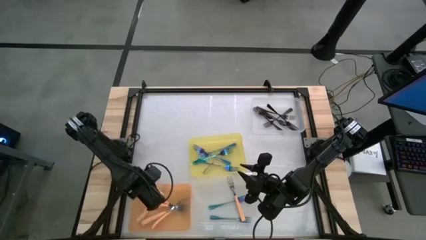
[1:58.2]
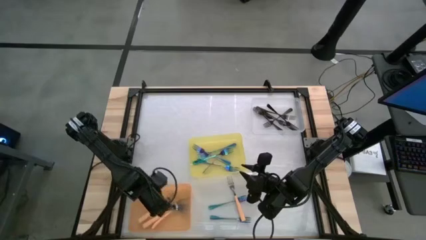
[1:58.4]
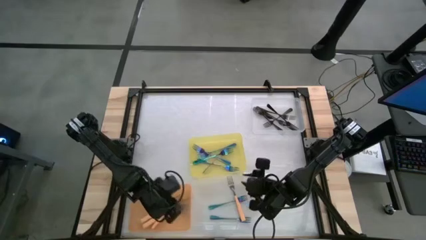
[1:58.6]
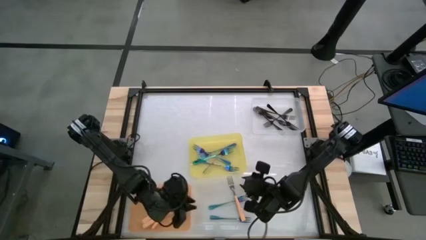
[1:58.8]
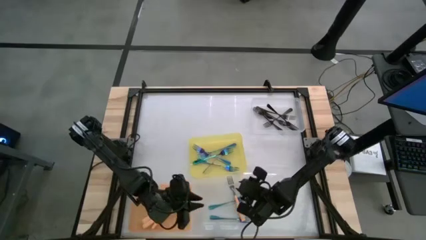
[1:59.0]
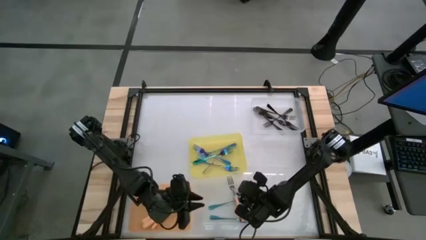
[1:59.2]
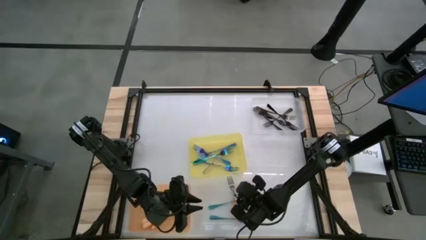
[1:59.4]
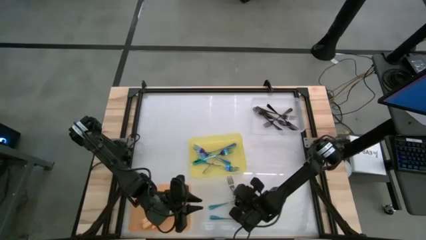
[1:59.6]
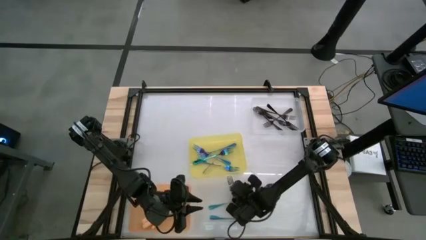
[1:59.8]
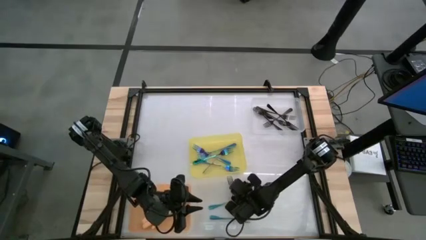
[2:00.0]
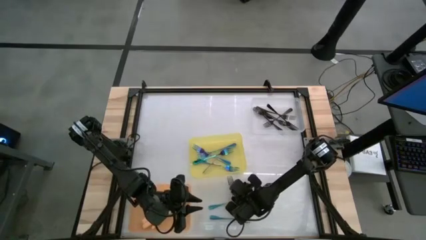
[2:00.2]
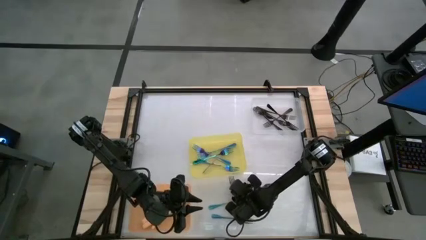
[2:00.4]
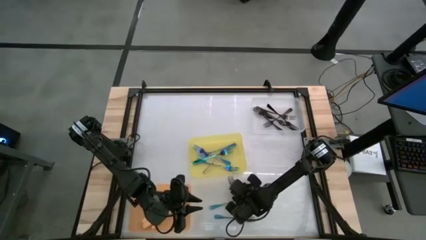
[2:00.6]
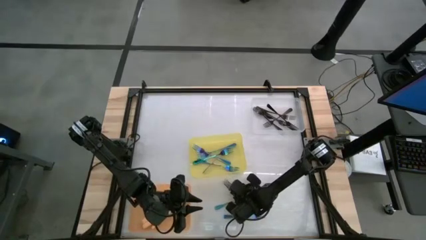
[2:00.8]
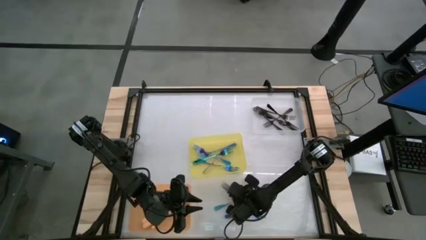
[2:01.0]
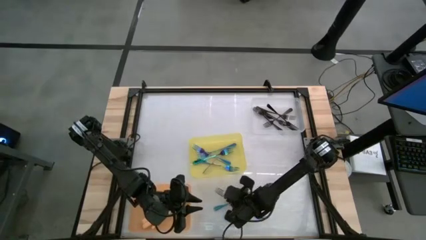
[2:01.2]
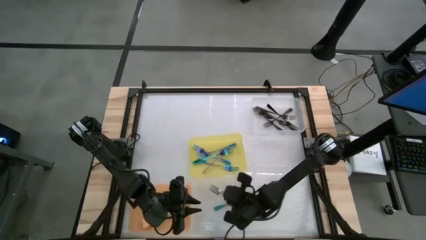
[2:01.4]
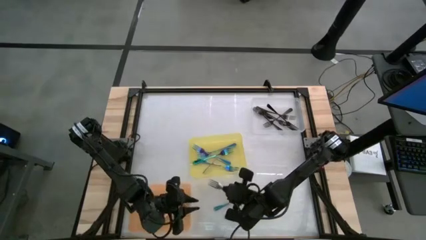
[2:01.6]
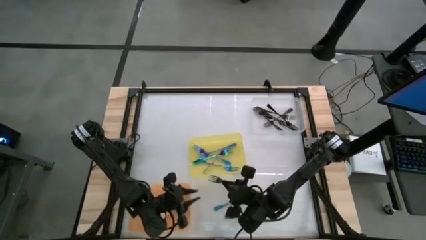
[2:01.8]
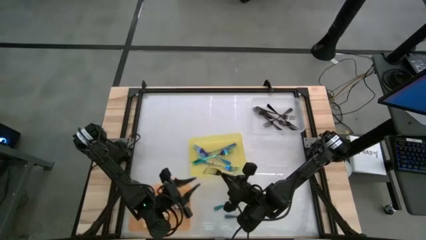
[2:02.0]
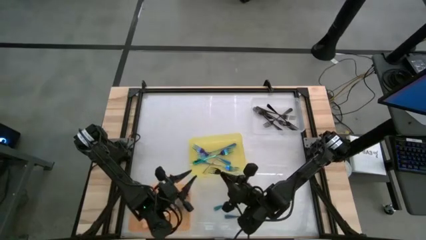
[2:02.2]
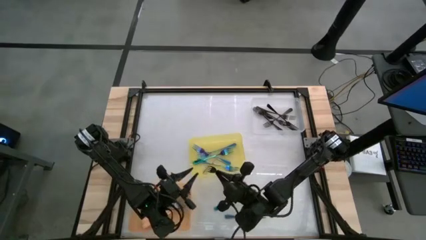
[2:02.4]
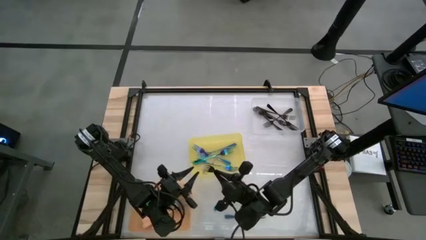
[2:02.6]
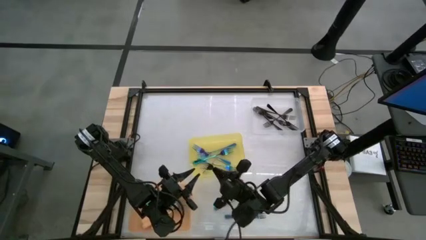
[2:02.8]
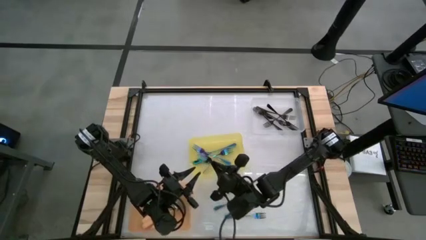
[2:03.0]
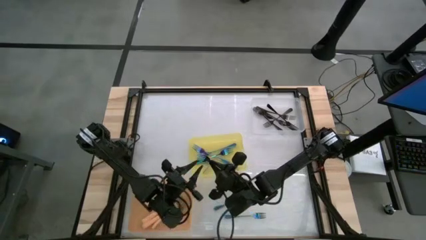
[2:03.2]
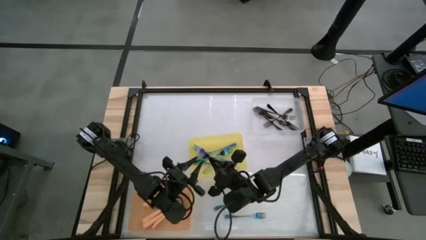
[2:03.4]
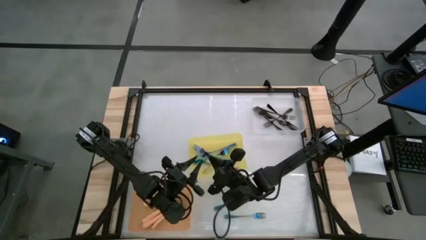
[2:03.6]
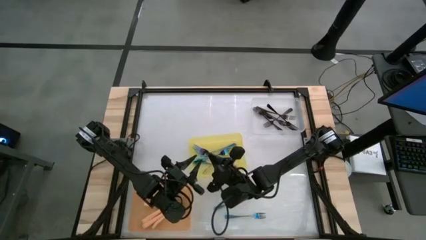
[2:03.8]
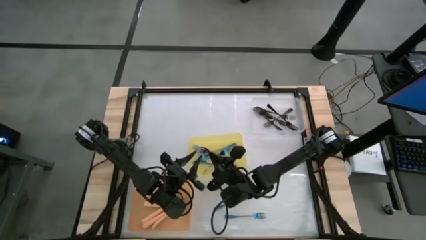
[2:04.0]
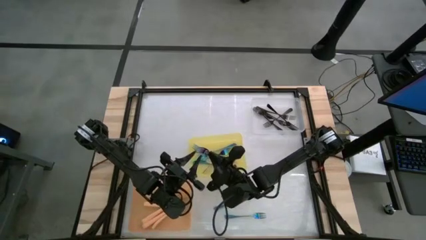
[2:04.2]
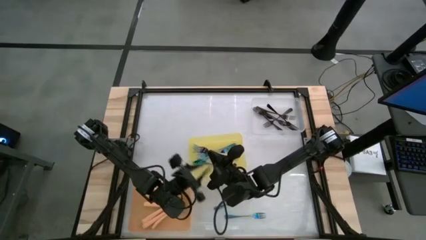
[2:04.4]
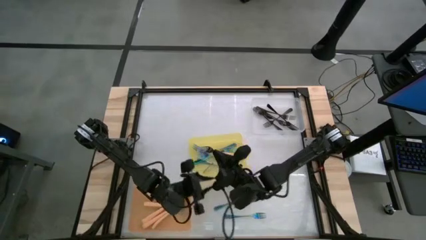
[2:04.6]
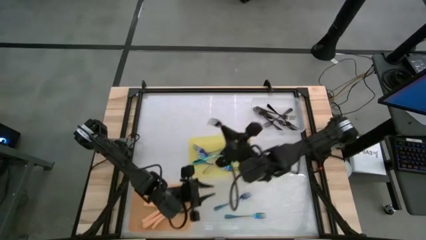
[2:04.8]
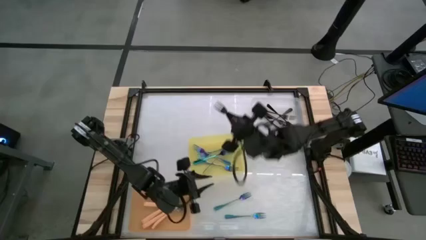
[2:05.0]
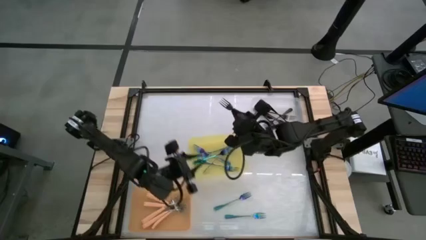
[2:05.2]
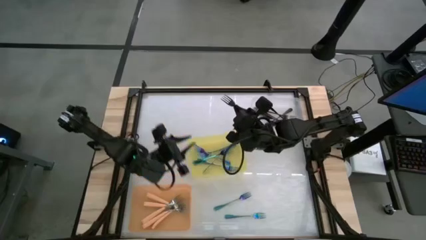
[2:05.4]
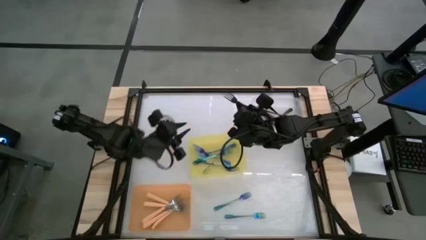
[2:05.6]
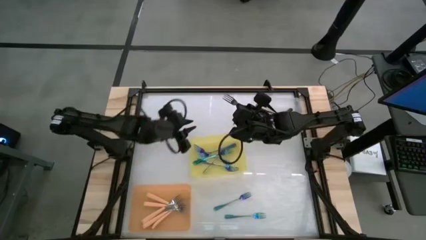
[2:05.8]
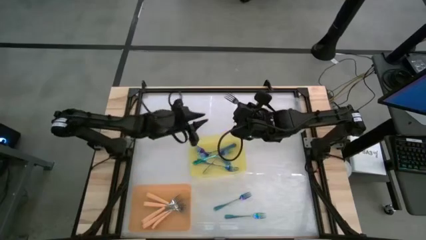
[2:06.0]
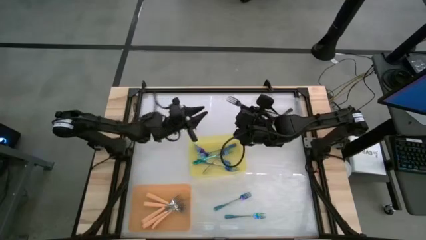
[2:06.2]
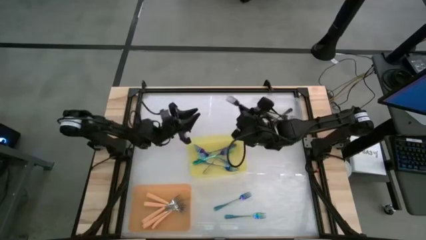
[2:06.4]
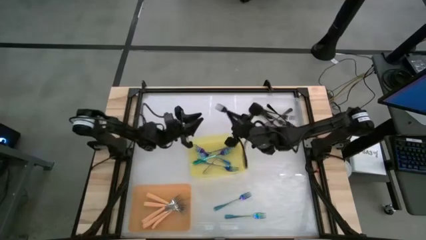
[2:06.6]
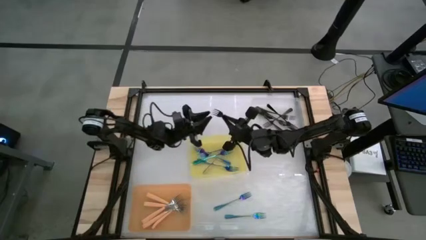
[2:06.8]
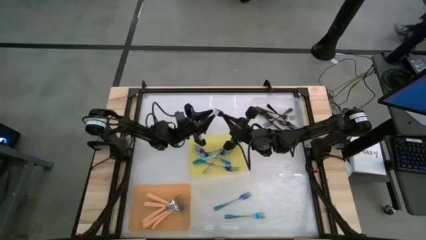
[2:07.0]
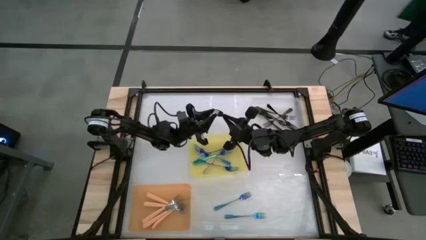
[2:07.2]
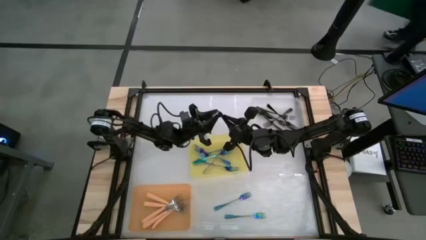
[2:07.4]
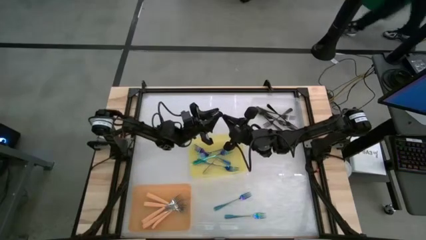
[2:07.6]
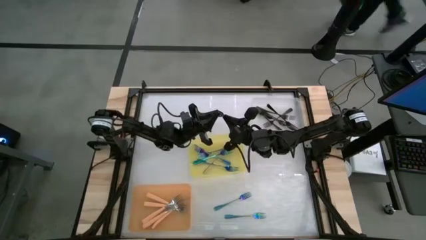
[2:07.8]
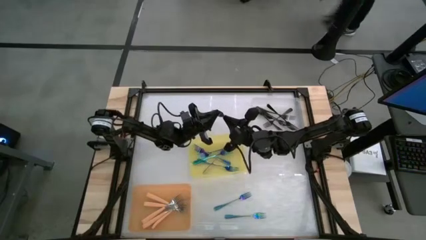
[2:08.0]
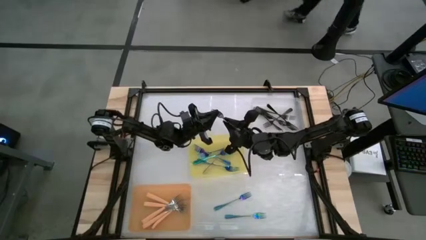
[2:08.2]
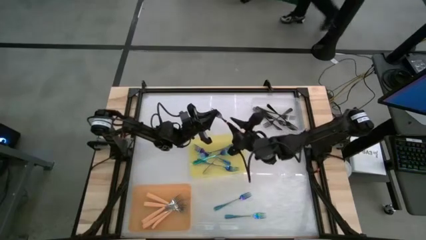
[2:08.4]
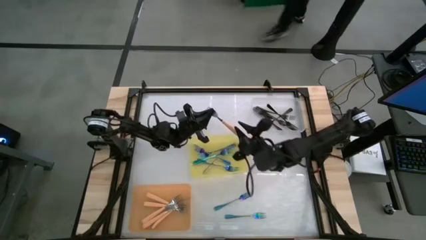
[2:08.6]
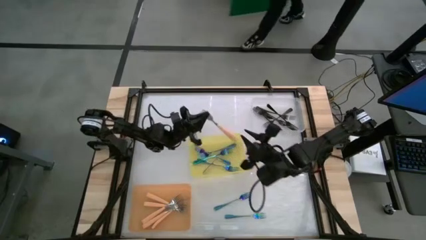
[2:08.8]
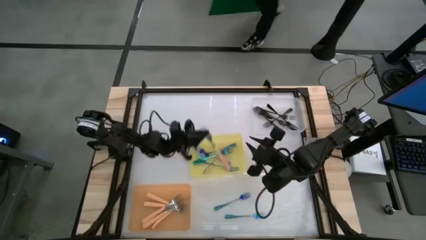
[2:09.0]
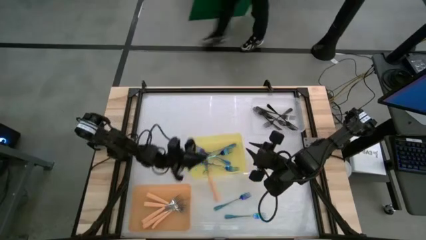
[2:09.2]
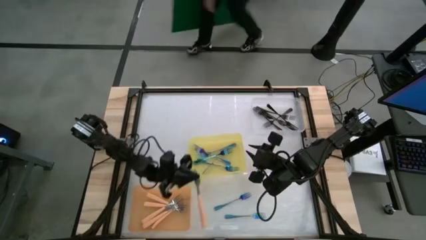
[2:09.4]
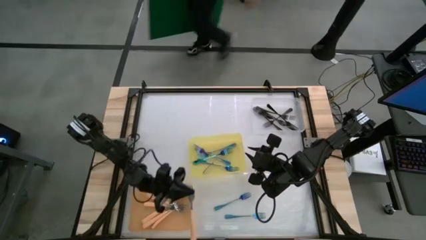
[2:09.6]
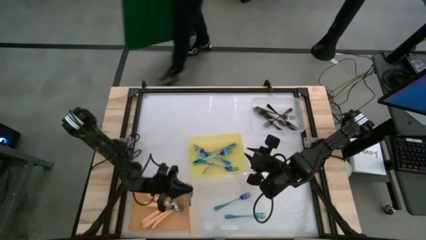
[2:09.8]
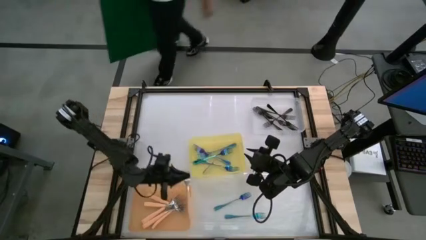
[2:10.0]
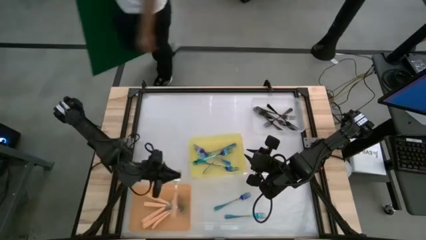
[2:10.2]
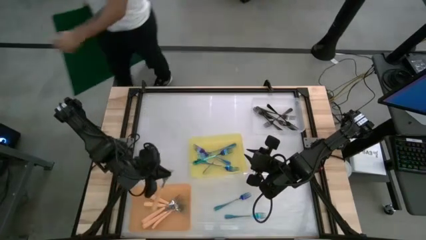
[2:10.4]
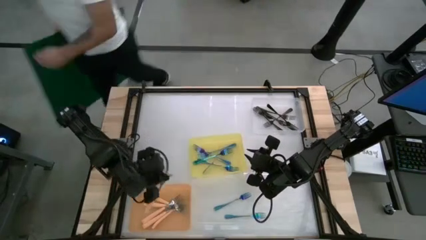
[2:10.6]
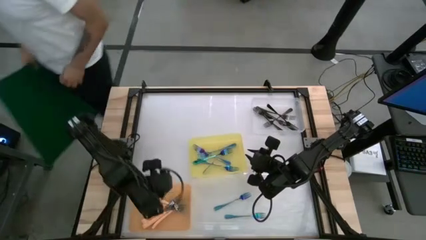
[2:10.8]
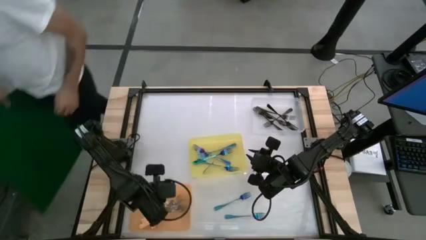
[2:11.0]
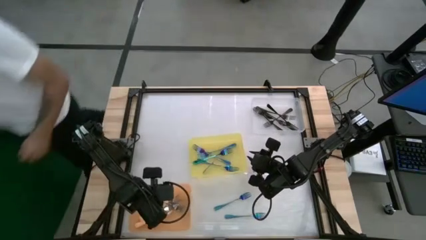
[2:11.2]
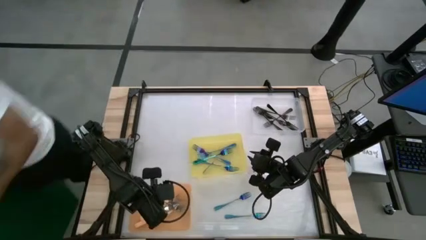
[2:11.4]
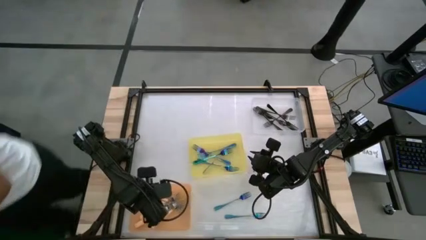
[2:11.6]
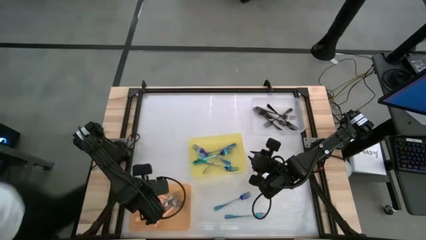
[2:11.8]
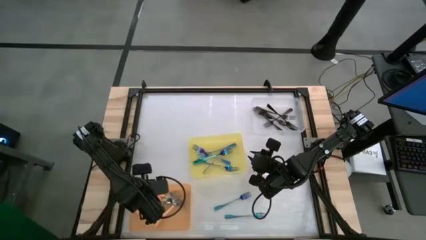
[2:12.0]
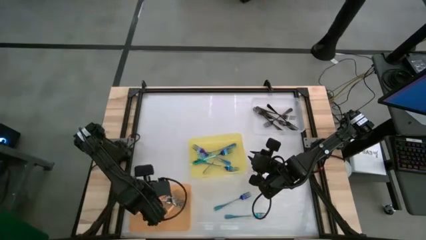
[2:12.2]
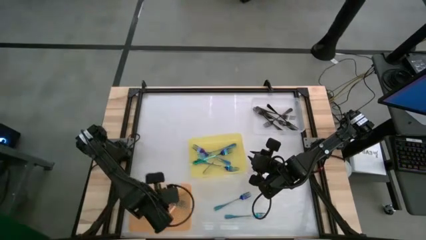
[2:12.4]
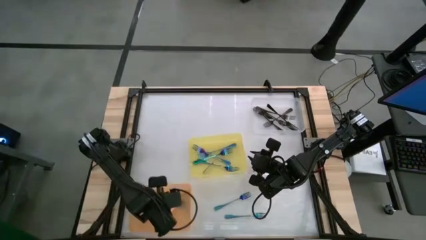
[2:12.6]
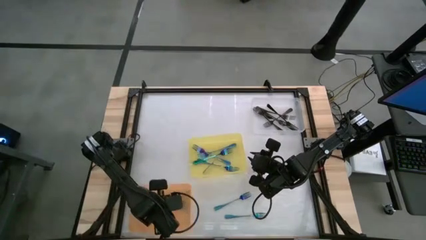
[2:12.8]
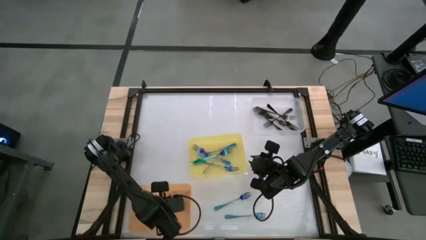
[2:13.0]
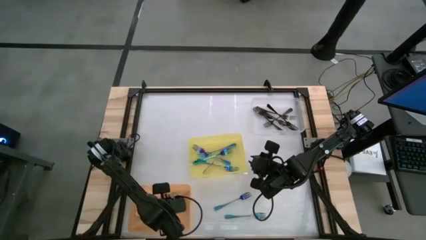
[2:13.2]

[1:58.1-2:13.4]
Task: Sort silverware by color (type)
Put the orange fork into the orange bin

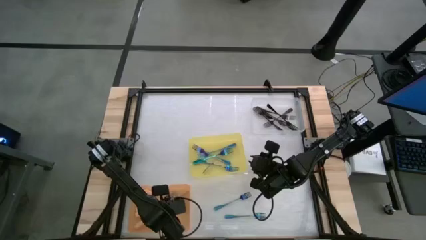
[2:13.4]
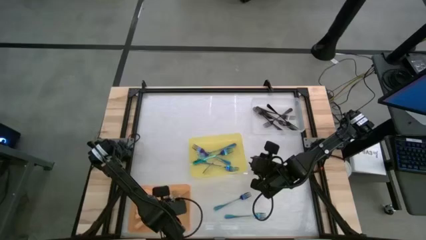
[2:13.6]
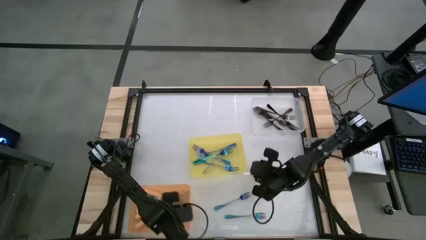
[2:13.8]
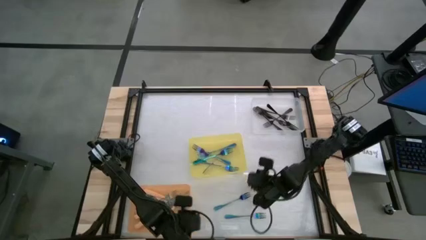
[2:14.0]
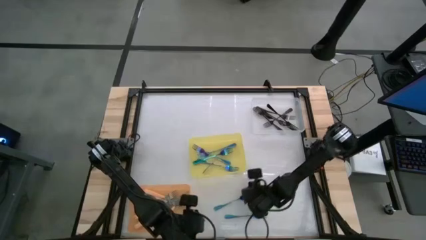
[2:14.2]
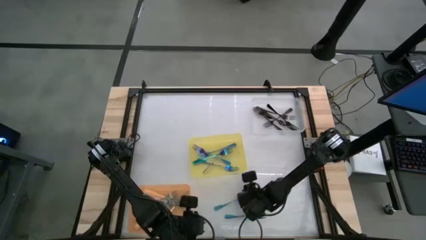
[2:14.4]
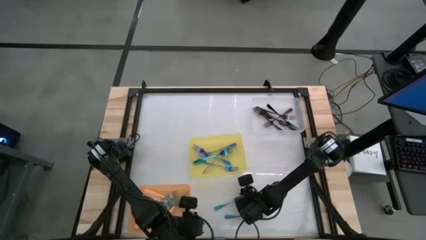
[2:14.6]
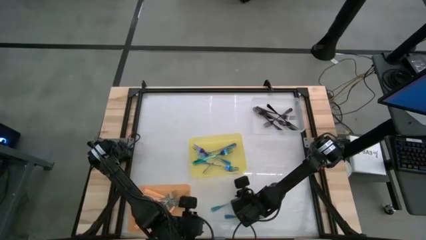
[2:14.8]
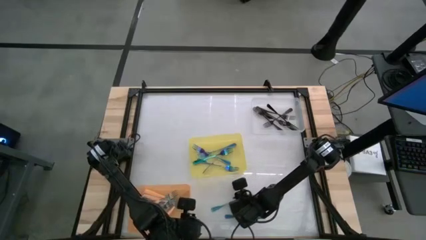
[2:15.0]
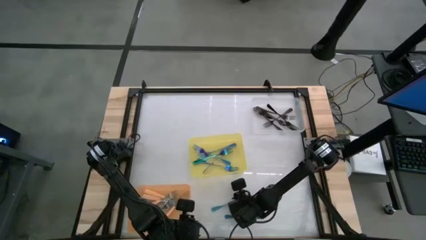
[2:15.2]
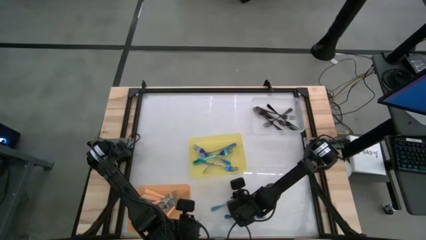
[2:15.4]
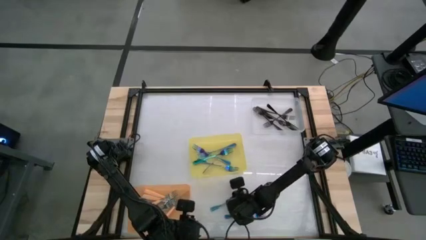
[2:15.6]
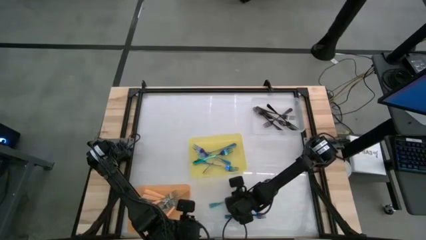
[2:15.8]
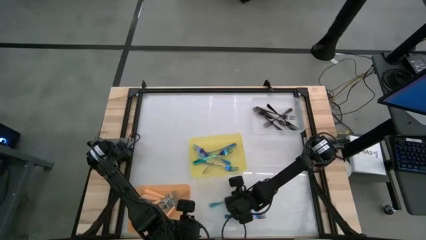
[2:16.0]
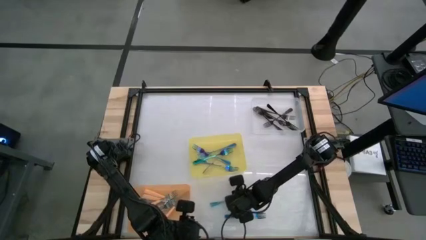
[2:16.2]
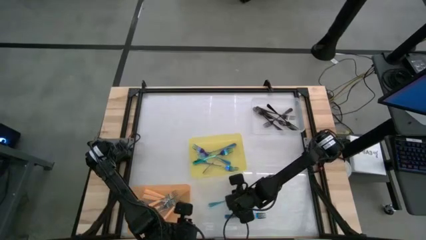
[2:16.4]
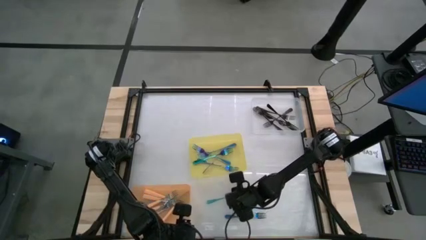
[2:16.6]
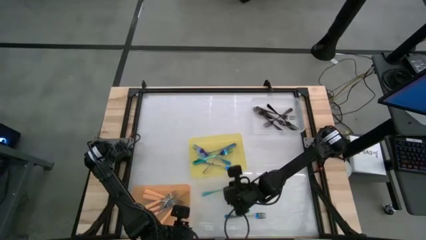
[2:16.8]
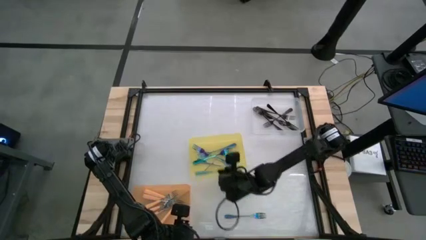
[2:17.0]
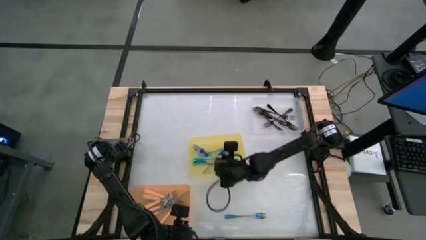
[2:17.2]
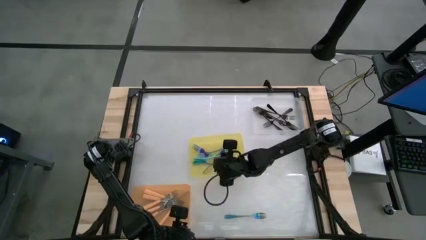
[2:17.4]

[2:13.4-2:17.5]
Put the blue fork into the yellow bin
